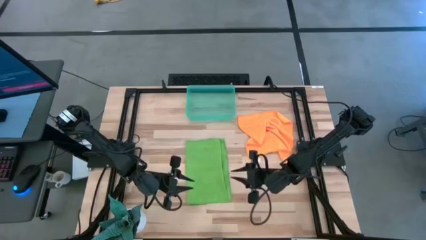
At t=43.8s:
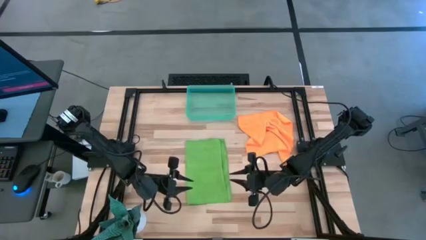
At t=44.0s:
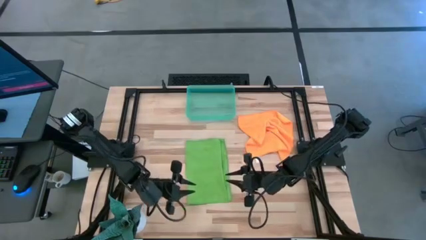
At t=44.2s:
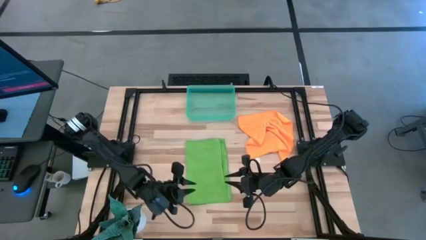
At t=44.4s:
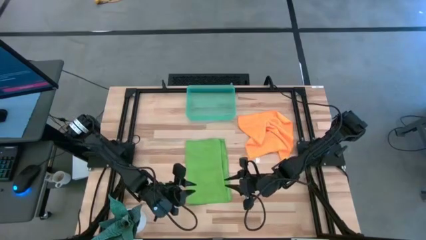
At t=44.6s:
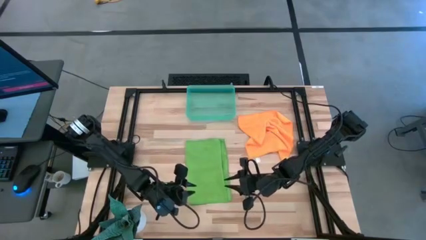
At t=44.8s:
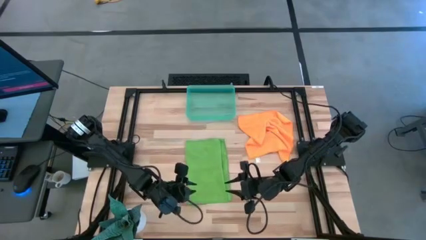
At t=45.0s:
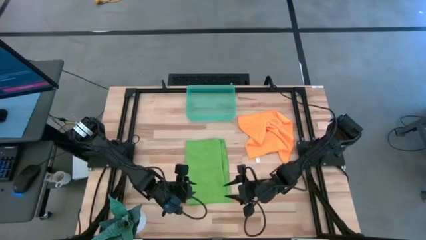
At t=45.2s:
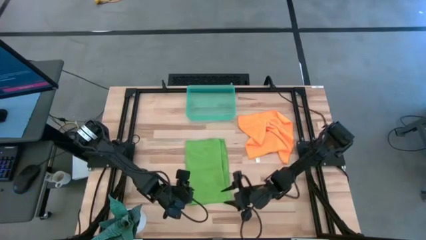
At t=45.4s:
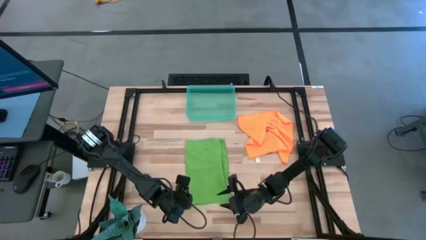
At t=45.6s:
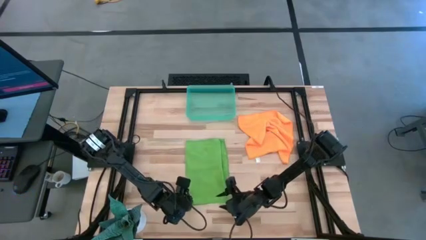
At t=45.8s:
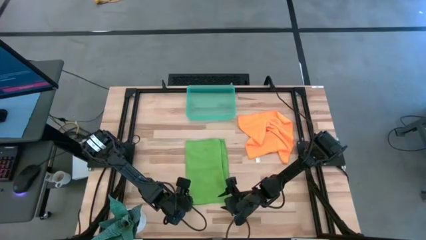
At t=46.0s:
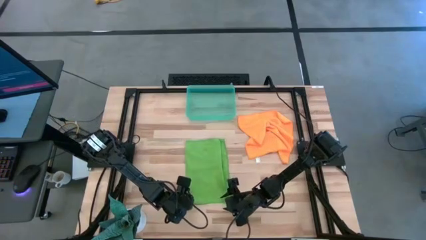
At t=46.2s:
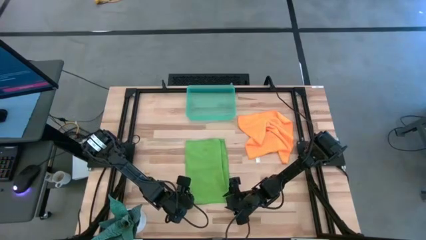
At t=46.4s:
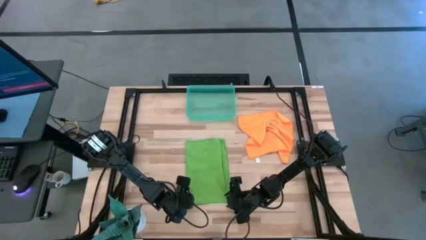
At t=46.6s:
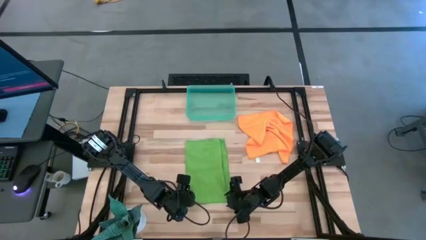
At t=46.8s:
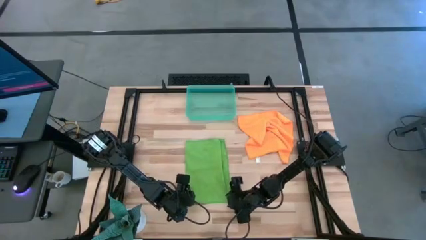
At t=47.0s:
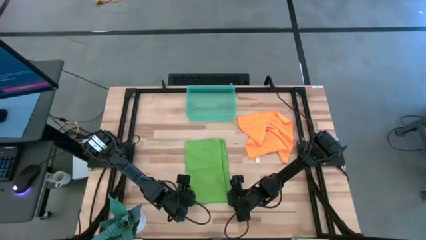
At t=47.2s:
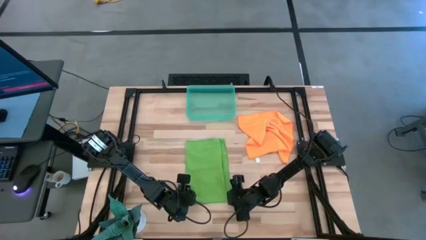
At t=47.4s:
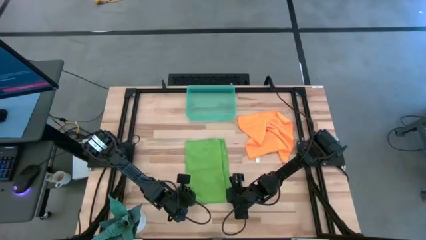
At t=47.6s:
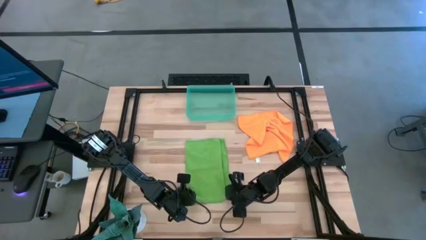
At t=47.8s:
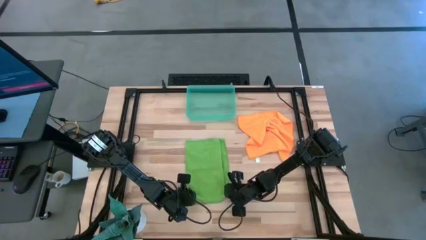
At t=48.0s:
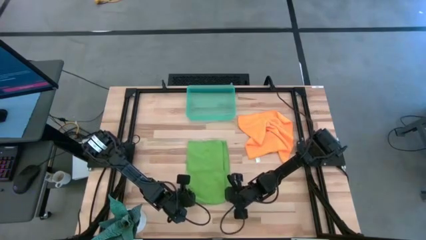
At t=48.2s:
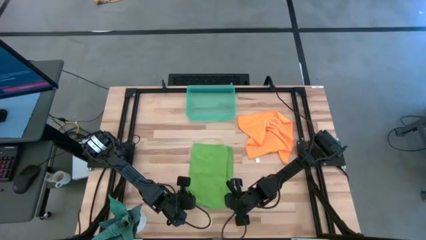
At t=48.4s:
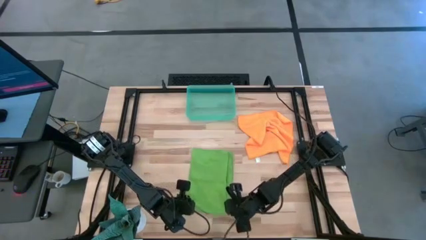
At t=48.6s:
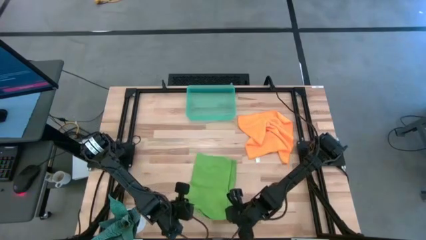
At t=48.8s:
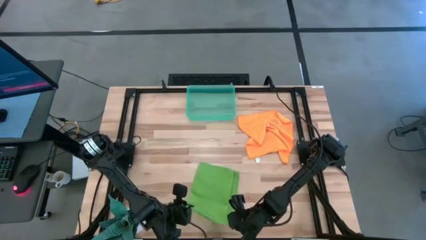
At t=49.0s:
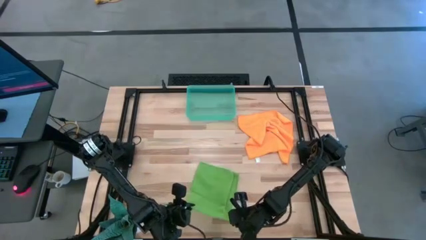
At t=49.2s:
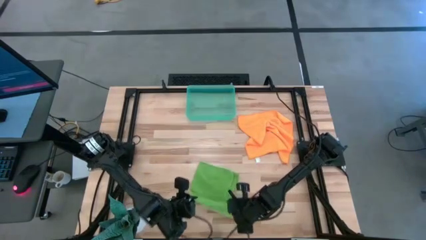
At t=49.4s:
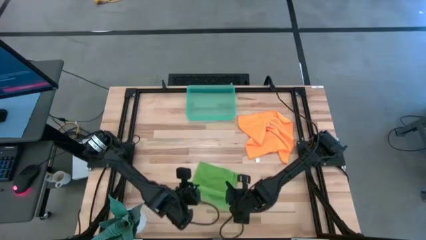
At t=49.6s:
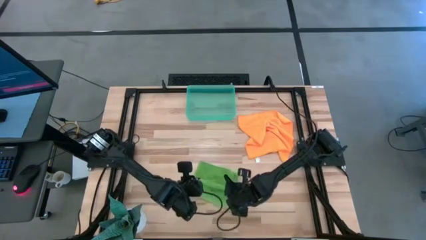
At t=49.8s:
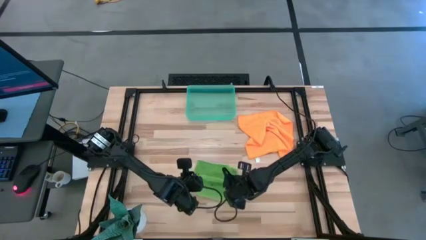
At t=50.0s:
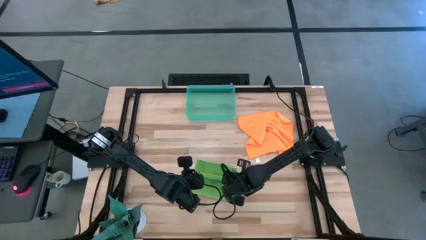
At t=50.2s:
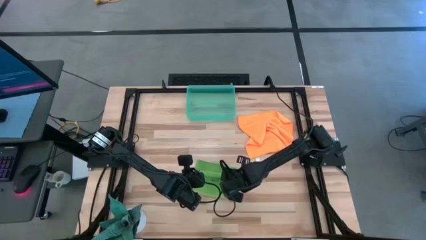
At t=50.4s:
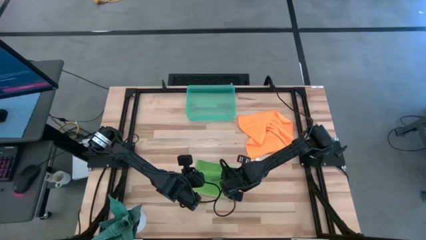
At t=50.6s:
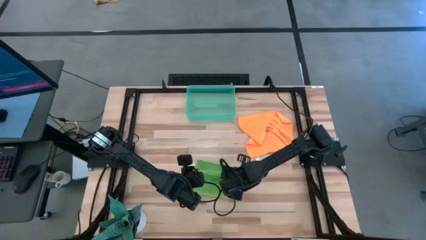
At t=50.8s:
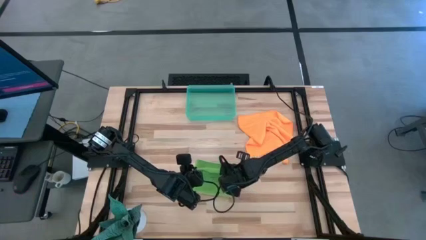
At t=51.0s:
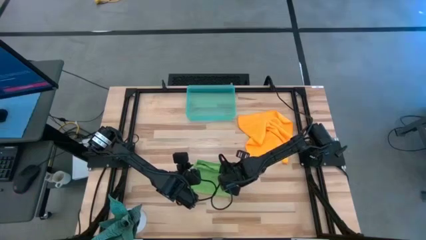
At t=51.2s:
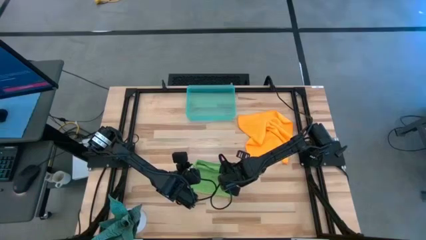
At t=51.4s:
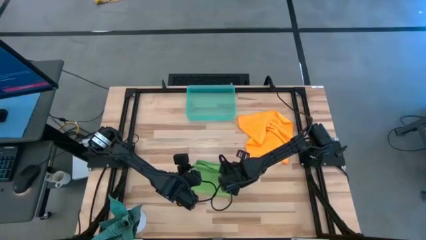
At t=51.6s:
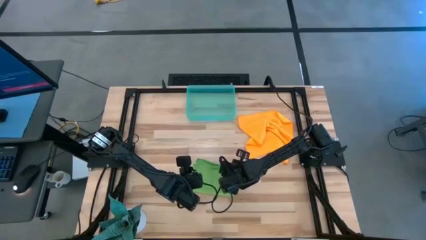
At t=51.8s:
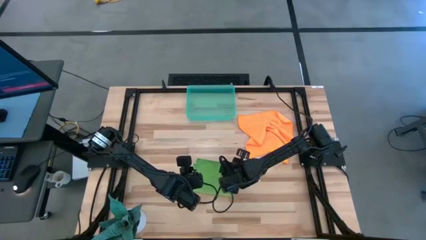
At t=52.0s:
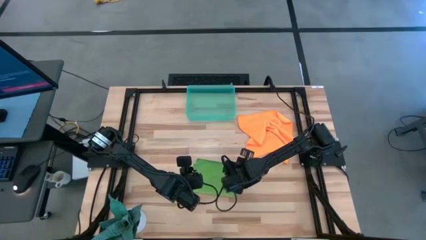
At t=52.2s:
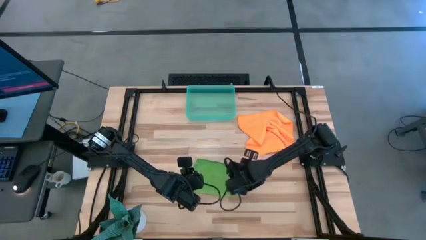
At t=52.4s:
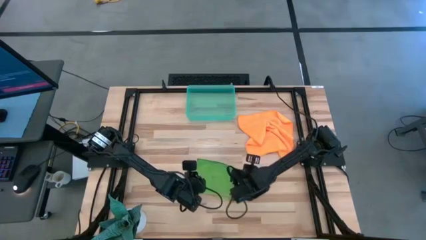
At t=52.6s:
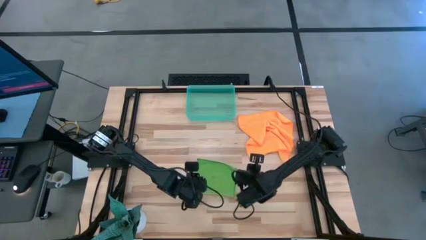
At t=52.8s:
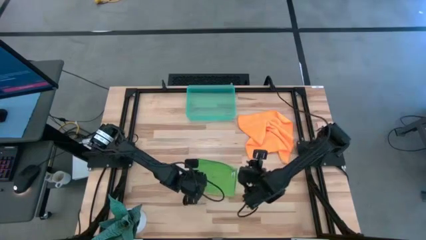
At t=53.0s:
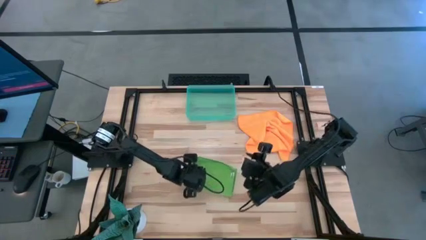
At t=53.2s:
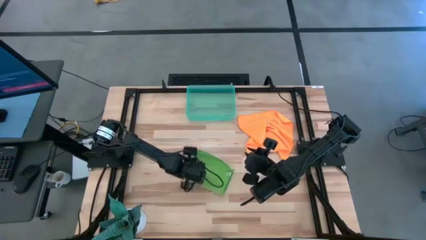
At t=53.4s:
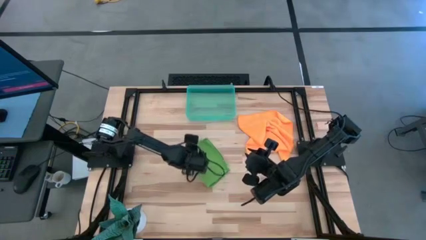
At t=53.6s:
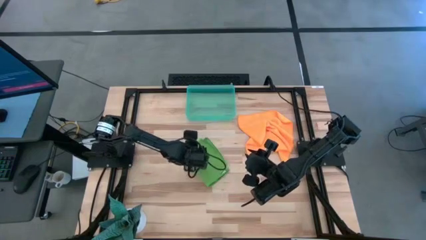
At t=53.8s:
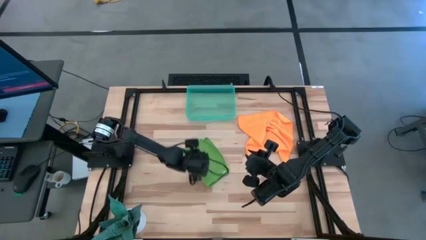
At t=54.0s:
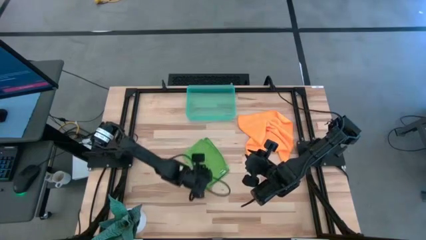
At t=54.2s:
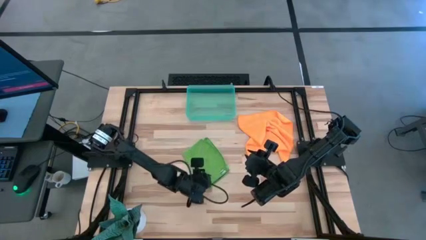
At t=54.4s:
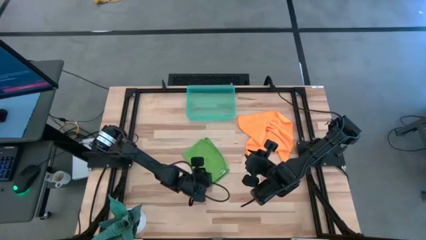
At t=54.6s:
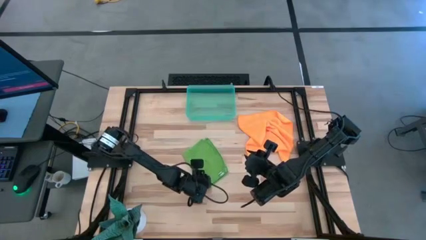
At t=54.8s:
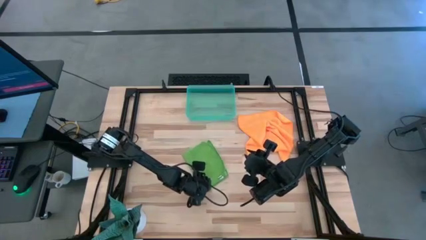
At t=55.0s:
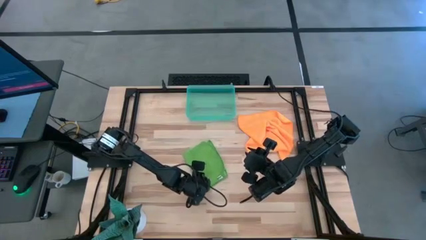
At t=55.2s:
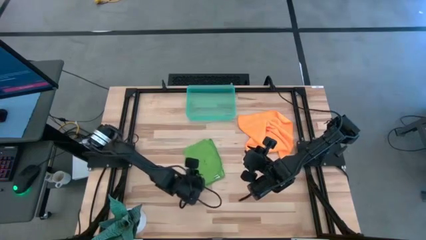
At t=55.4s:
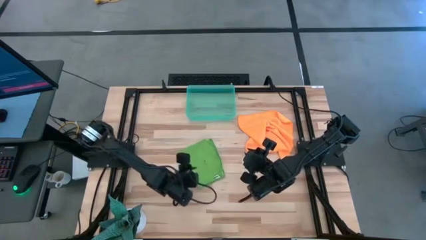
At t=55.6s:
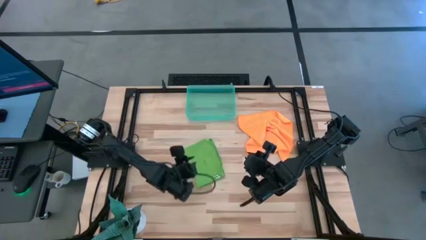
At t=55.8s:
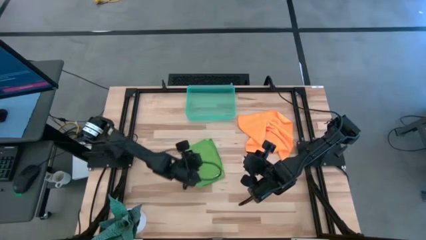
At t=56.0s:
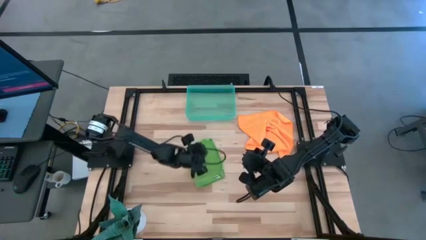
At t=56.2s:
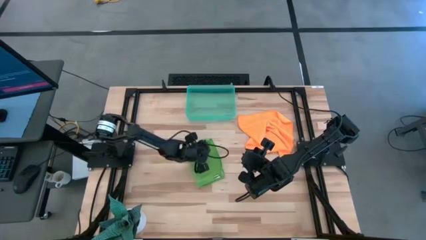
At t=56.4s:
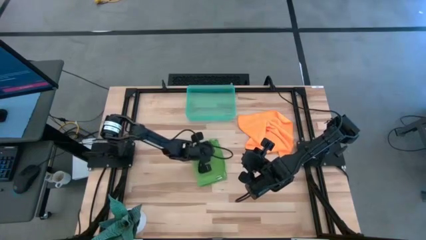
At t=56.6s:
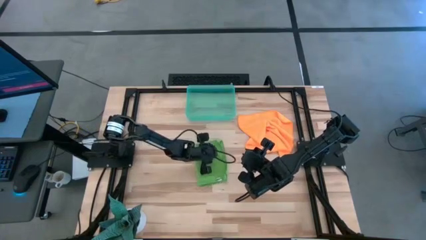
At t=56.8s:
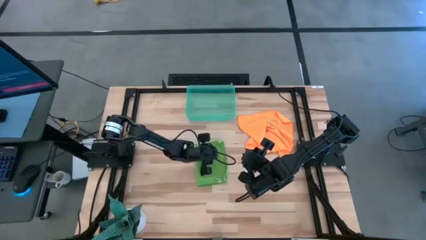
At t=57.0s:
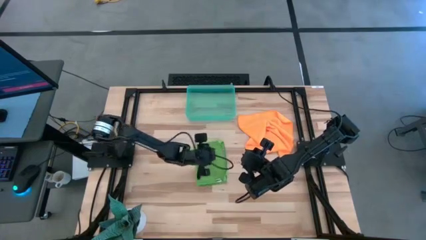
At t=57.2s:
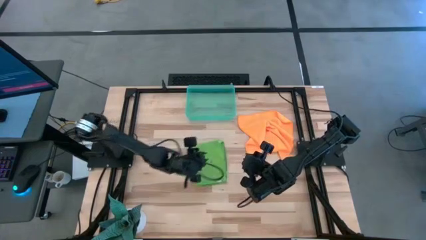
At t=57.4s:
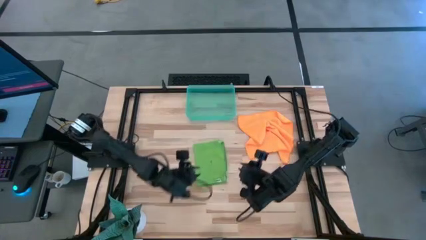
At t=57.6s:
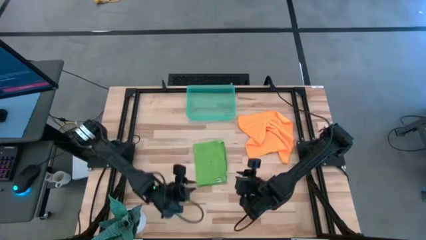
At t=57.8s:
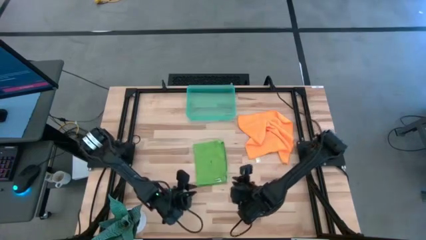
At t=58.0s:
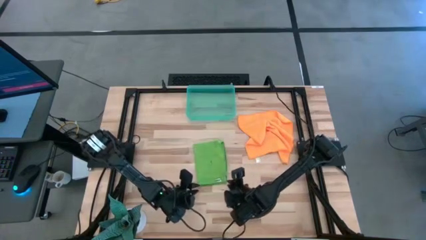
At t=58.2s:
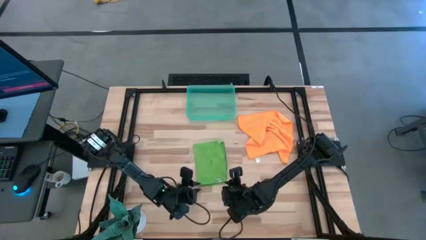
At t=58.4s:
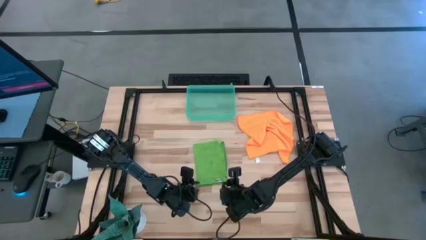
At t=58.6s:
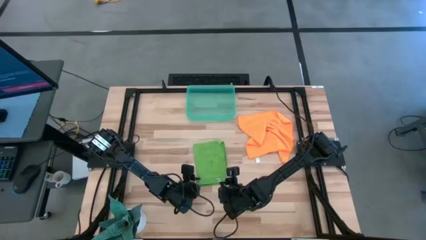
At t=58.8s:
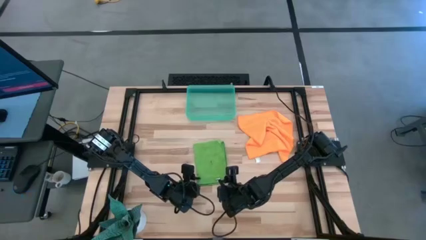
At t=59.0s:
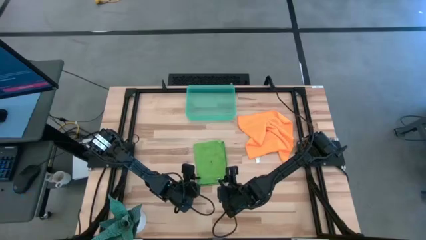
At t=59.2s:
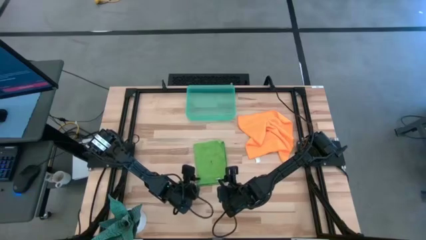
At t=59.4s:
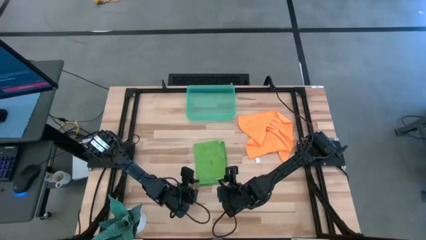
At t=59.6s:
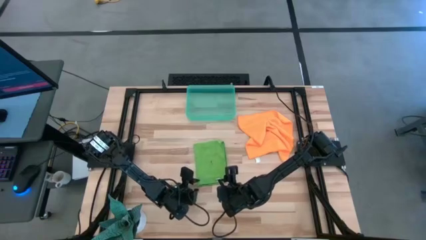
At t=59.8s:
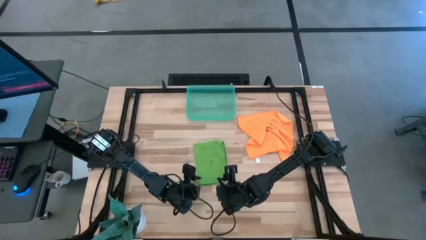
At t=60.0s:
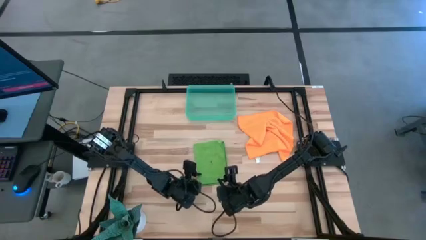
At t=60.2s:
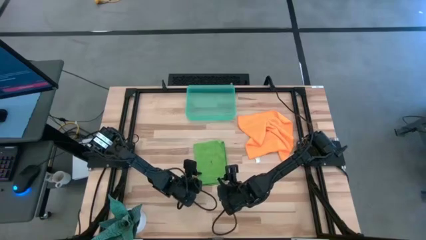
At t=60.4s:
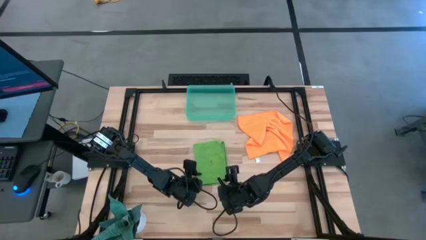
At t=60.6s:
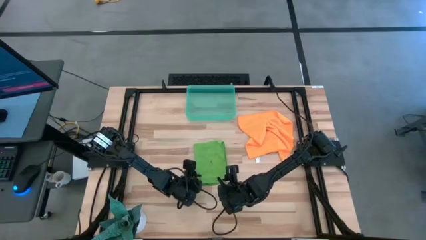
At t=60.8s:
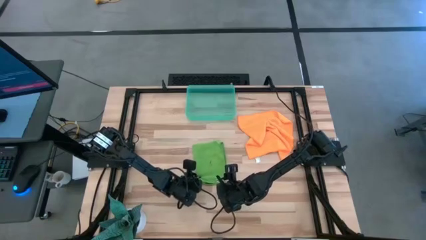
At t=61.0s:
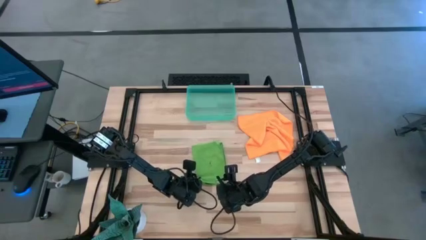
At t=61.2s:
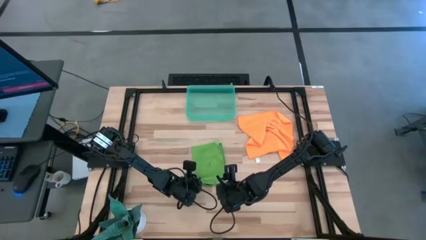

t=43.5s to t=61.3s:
Task: Roll microfiber towels into tight, uniform cylinder then place into a basket
Fold the green towel
